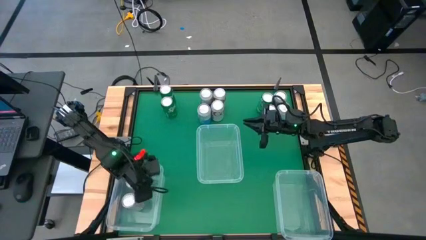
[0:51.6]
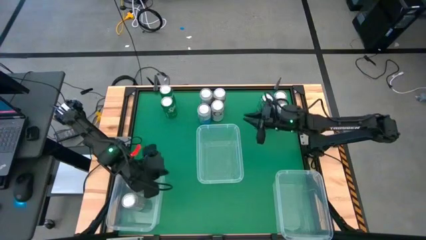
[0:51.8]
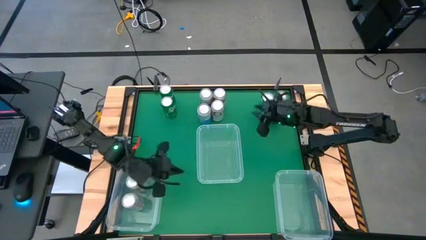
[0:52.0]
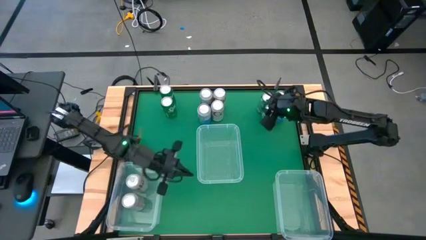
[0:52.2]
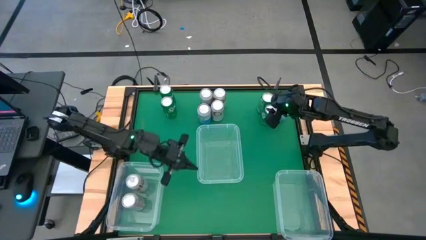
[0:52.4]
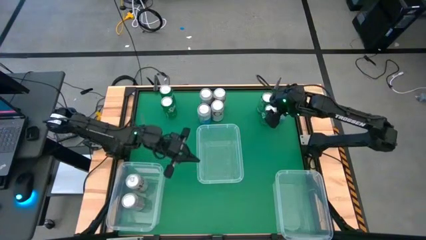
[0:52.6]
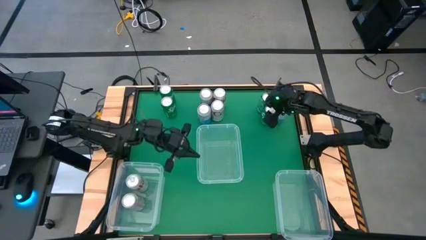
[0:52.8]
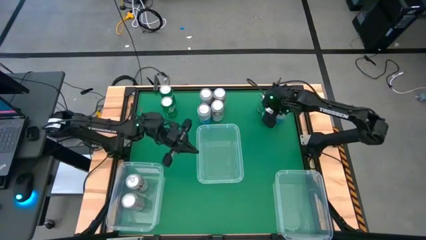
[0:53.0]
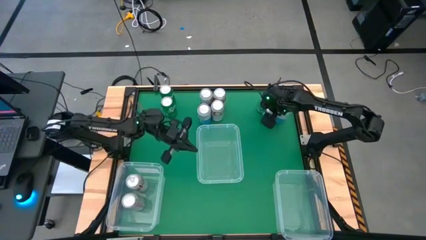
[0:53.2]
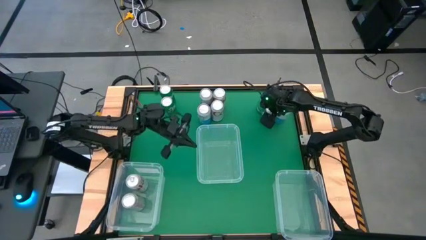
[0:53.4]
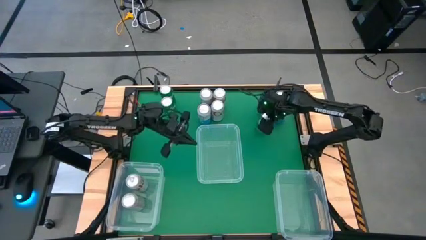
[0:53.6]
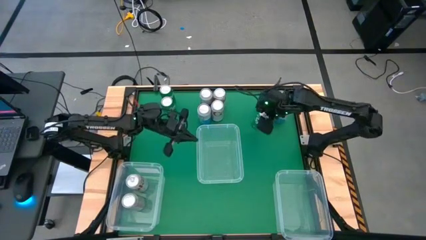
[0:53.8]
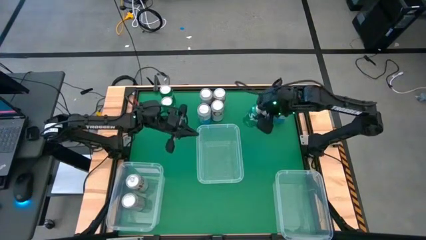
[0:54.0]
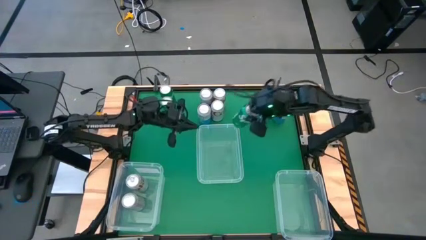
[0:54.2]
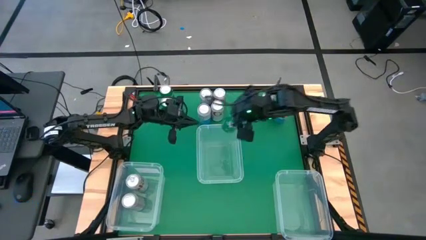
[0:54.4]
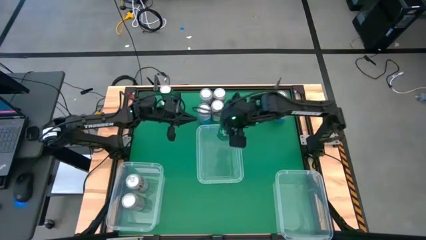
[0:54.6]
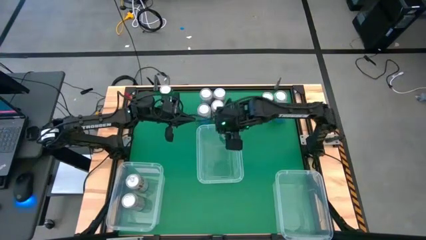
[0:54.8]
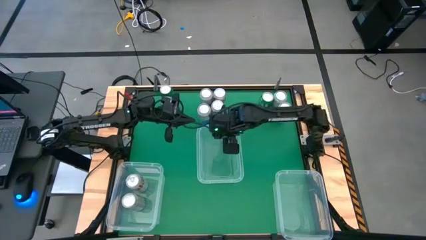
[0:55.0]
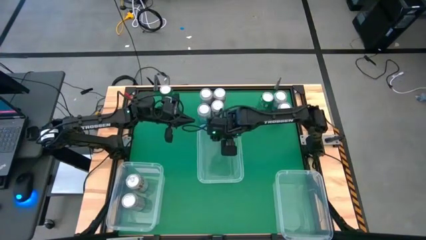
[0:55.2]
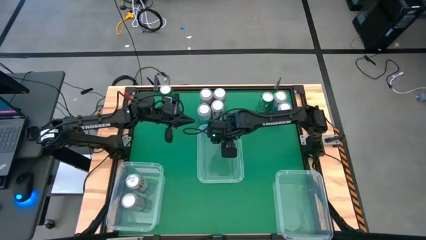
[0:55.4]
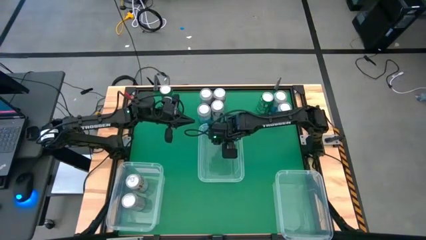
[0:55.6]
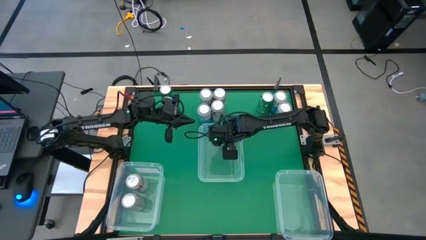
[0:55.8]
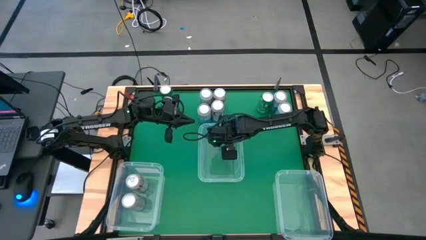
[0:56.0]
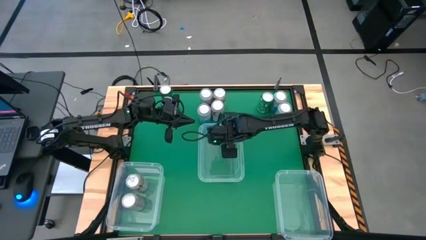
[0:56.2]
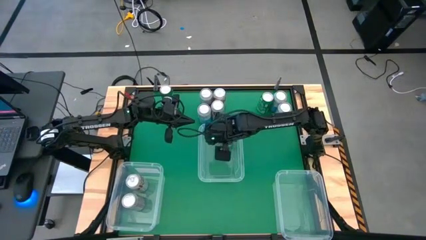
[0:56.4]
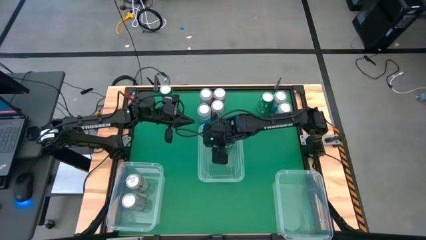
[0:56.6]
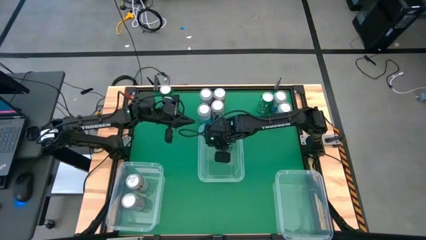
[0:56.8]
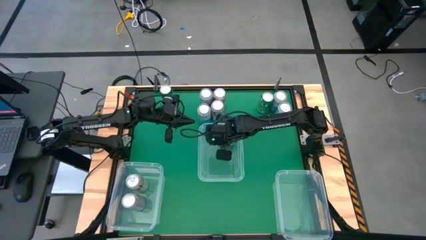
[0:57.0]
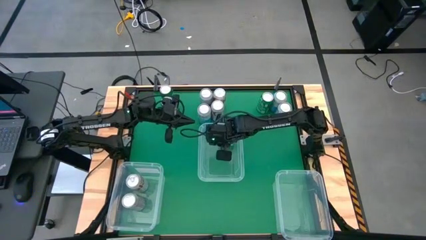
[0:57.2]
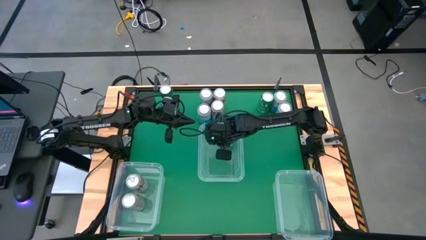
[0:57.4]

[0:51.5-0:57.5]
Task: Sort soda cans
Put the green soda can into the top transparent bin

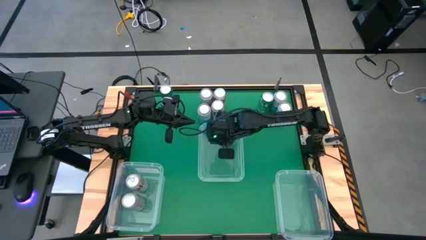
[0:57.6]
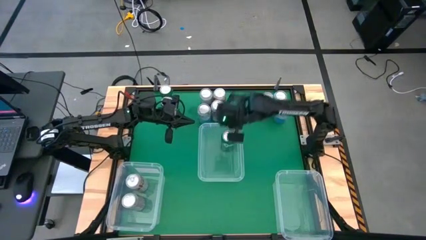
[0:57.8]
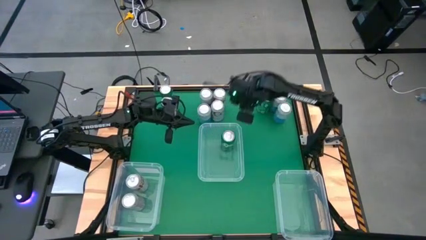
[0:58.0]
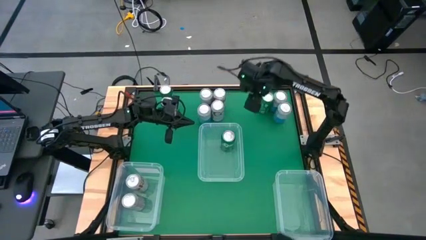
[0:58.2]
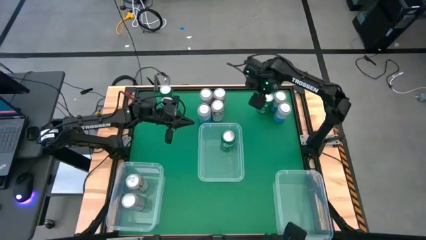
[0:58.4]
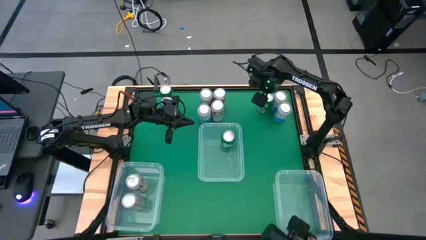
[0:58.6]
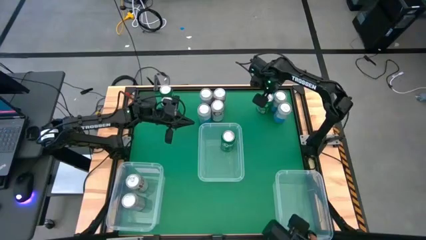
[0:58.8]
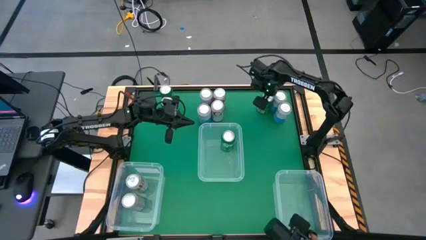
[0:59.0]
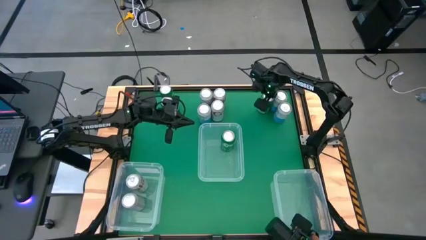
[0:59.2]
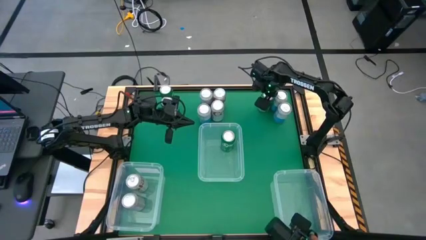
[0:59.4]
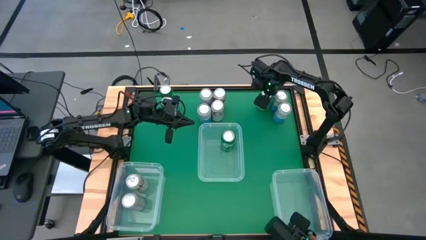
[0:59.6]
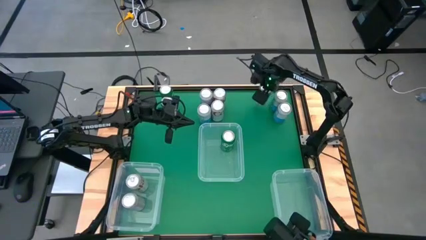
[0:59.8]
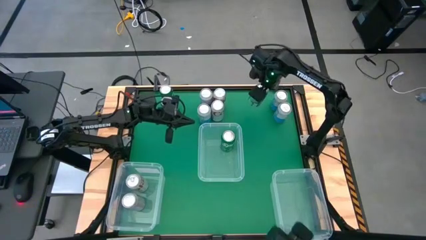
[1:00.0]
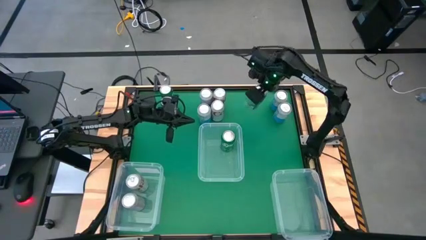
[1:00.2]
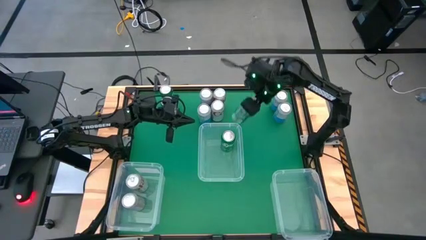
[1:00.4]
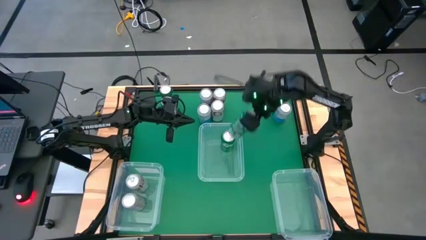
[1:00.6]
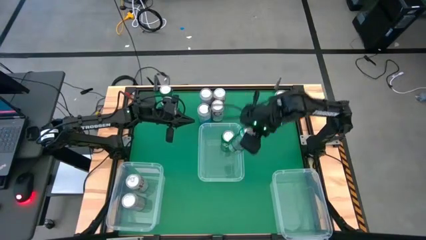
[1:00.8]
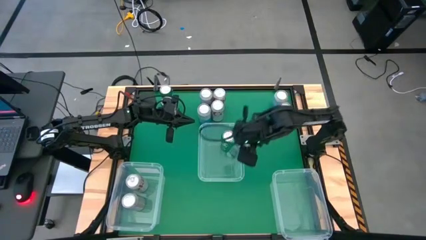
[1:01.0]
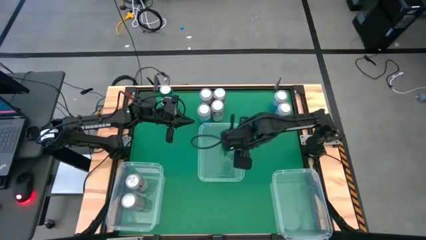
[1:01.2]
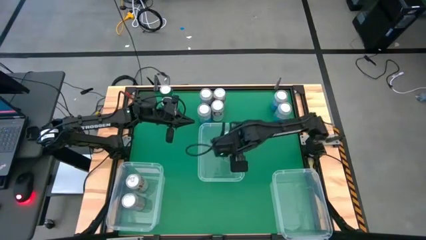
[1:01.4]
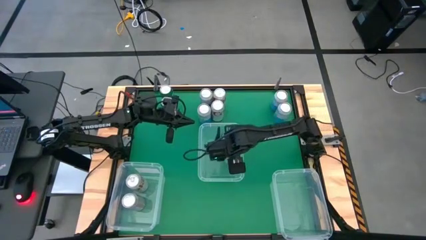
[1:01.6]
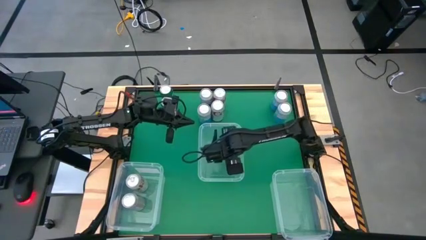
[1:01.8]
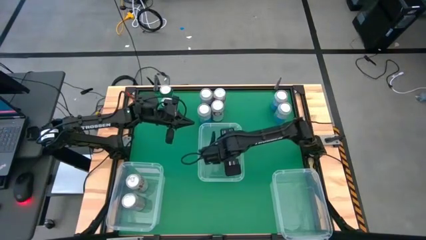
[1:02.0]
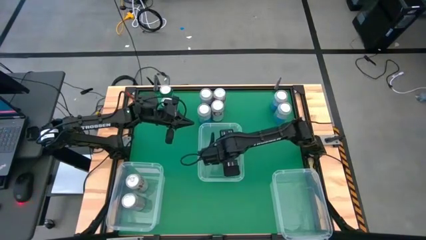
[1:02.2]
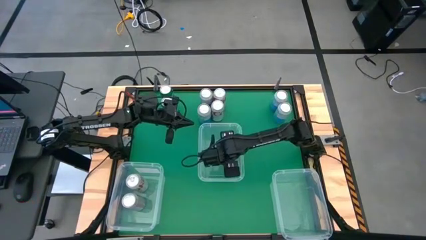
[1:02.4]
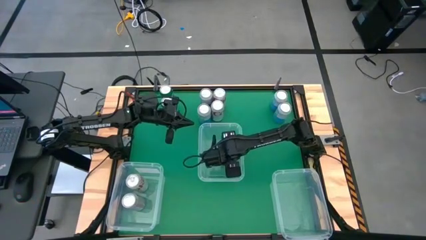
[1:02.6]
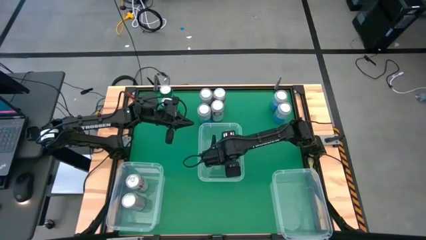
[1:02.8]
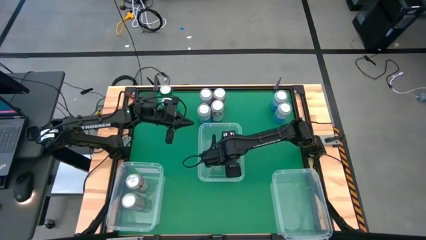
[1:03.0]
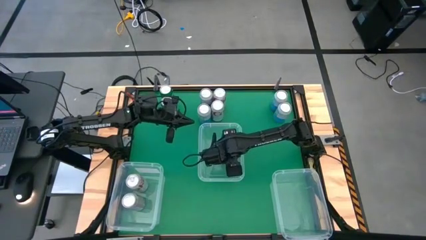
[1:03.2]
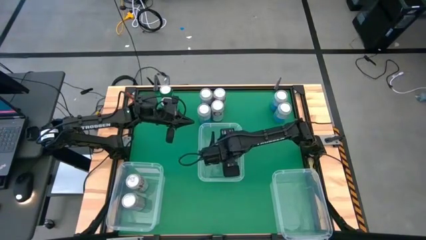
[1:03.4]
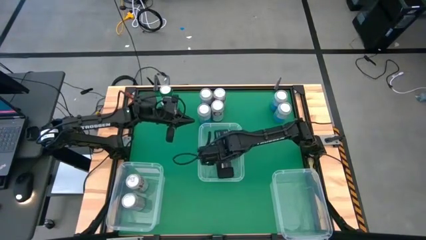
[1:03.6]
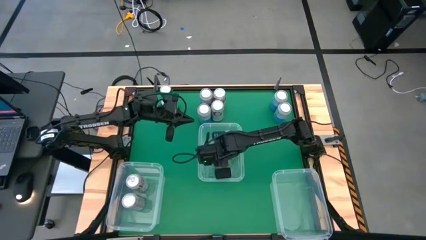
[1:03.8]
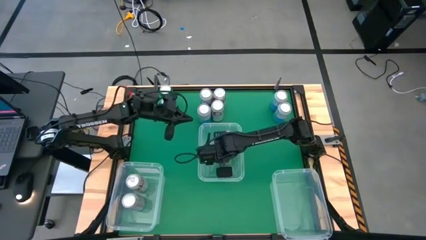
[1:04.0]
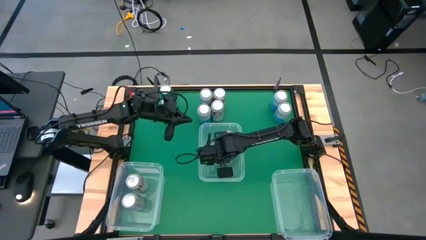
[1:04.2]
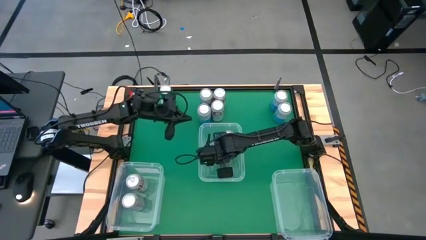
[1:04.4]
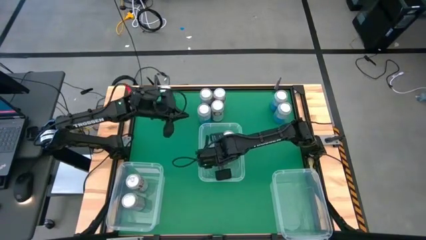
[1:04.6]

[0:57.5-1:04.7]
Put the green soda can into the top transparent bin

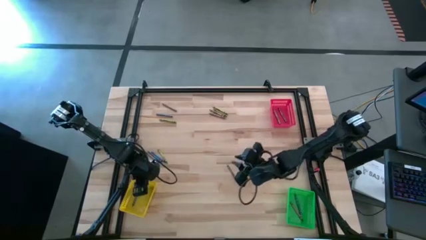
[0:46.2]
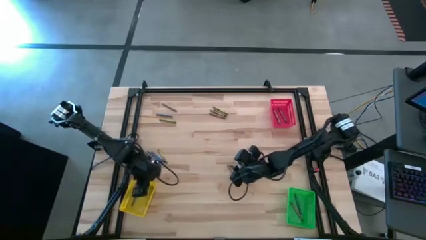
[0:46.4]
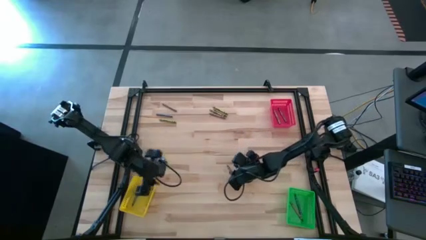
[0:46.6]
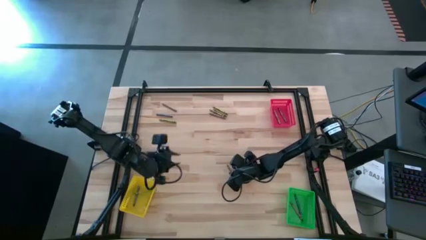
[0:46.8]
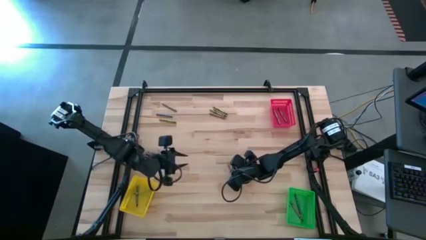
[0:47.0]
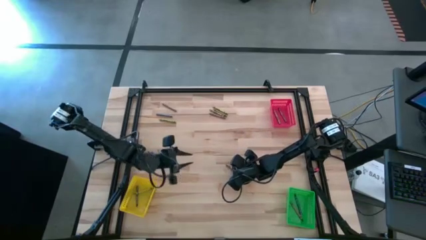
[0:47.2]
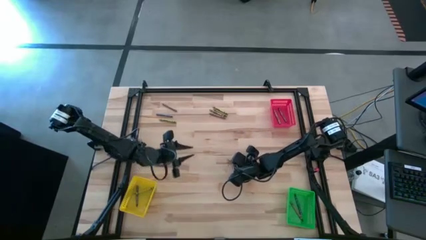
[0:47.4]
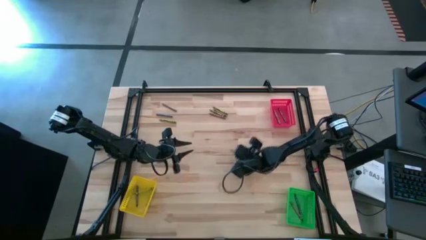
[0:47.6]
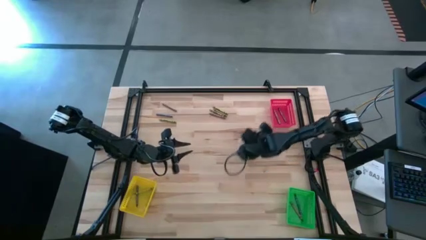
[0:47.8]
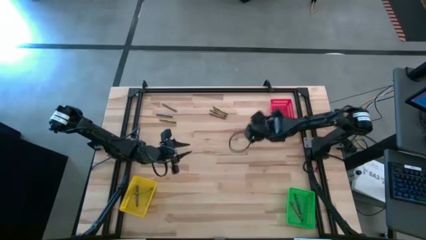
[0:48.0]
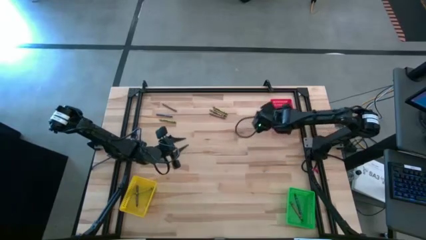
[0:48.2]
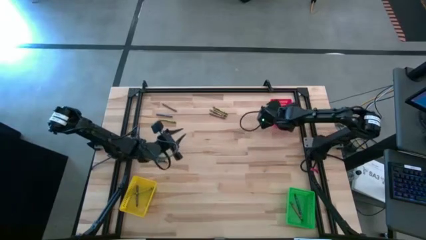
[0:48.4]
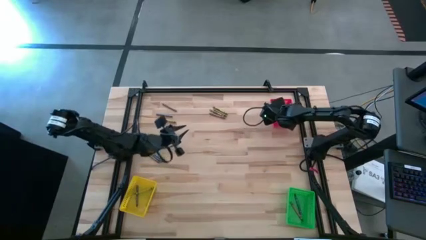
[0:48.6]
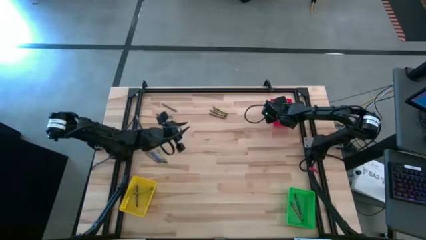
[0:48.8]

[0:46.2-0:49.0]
Task: Sort crayons
Put the brown crayon into the red bin
